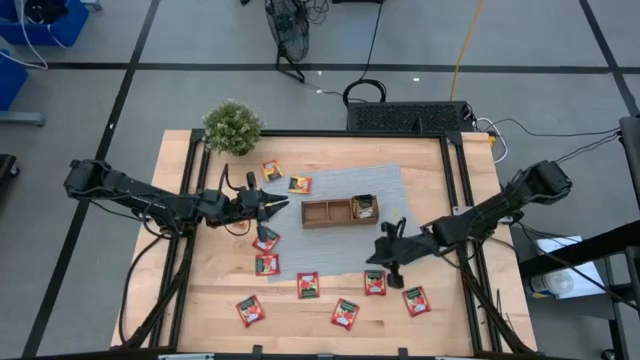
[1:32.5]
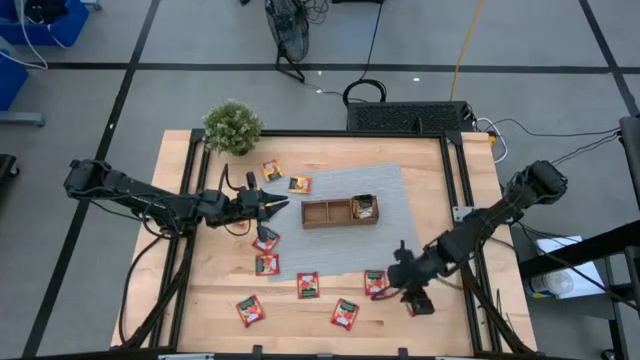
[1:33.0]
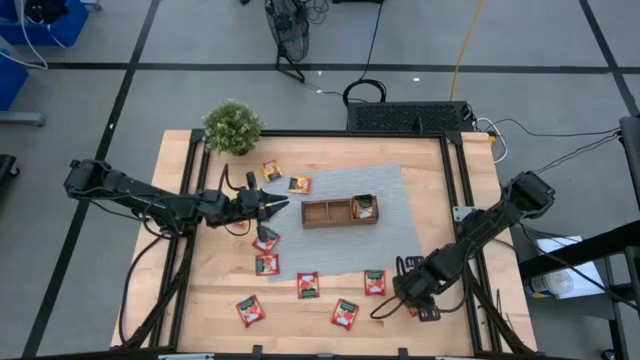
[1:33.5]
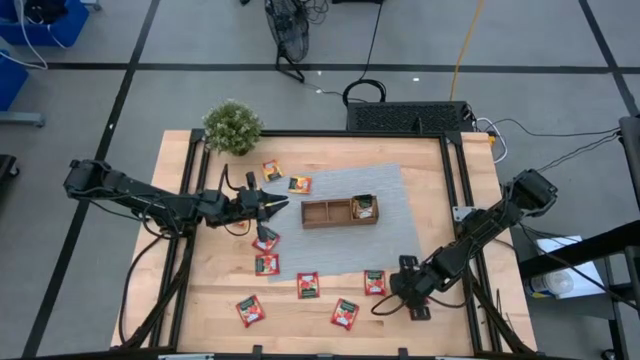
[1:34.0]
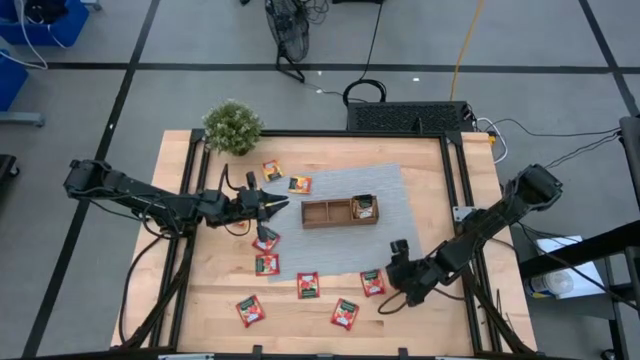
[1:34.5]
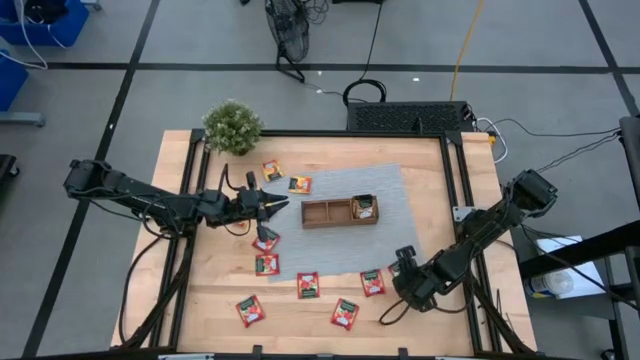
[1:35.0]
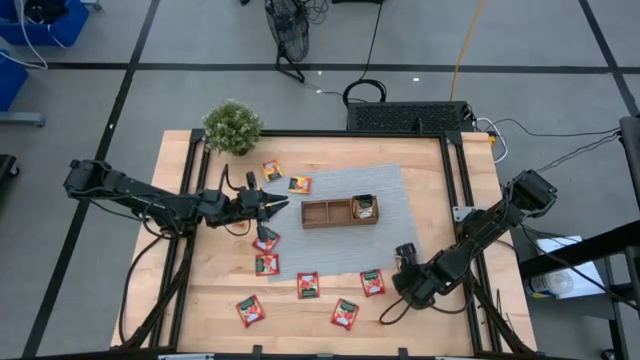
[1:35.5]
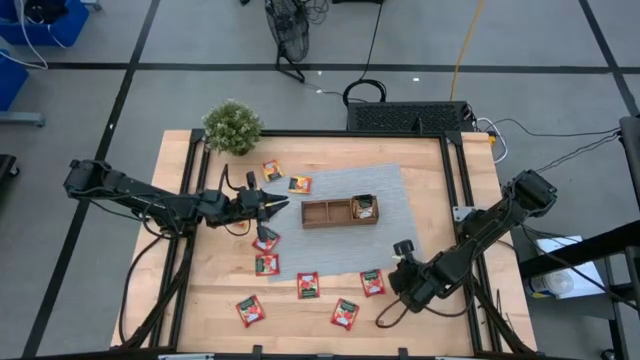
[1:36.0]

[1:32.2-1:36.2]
Task: Pick & Place Tea
Put the red tea bag into the middle section of the wooden organizer

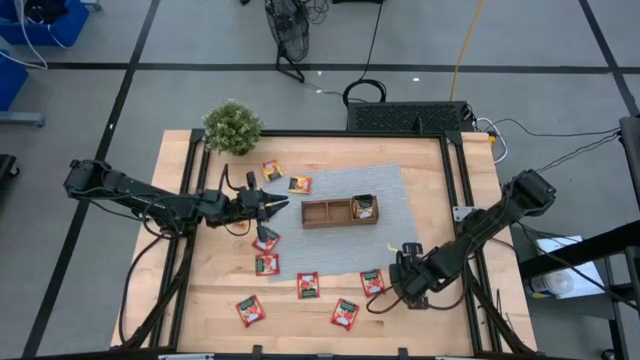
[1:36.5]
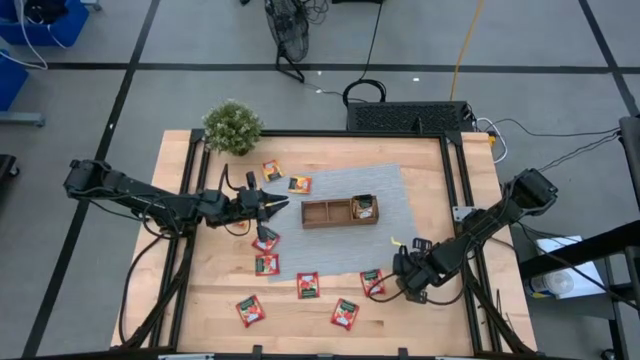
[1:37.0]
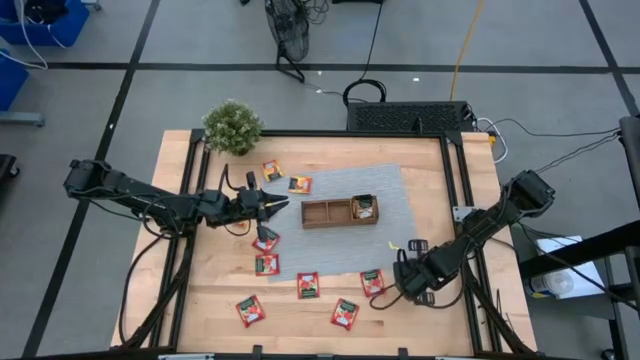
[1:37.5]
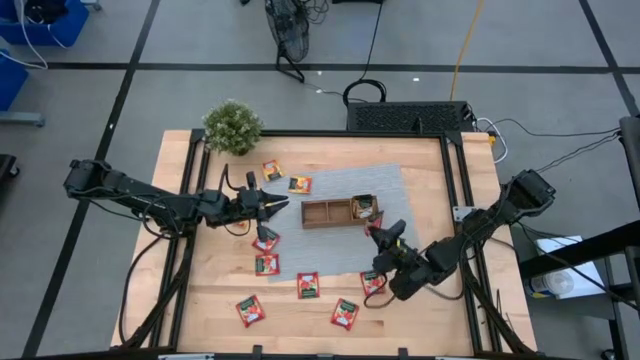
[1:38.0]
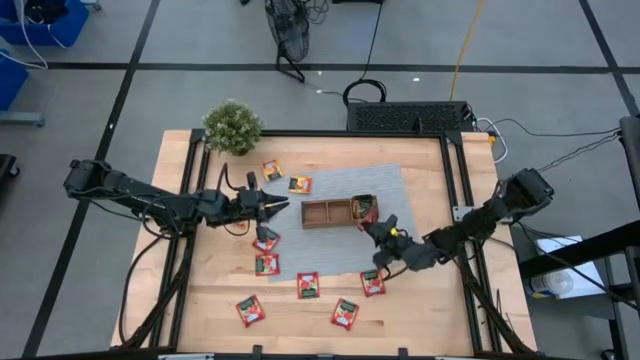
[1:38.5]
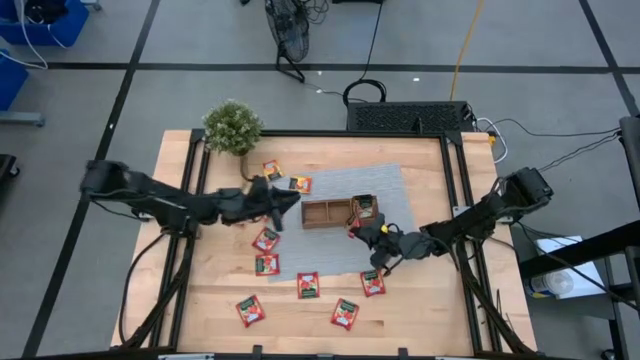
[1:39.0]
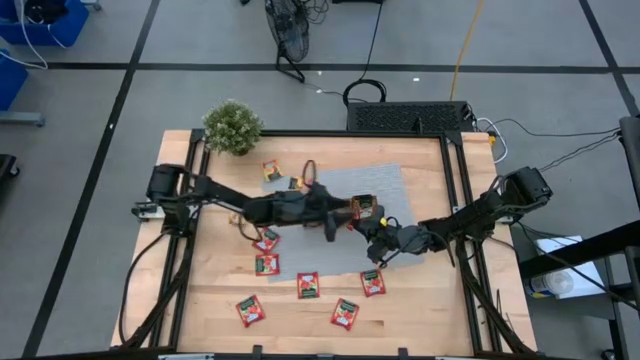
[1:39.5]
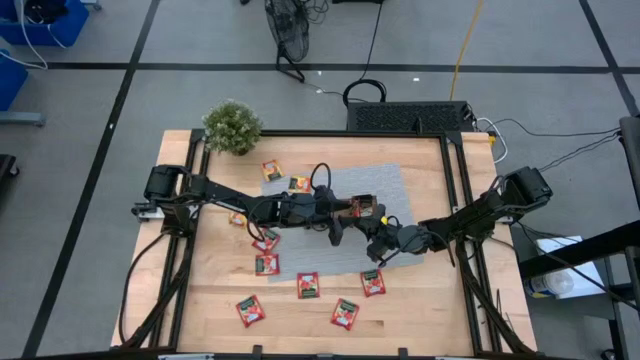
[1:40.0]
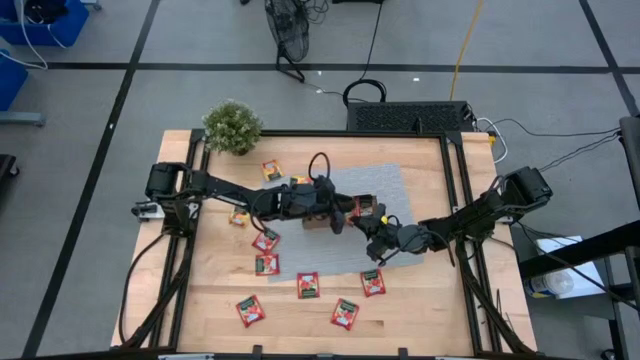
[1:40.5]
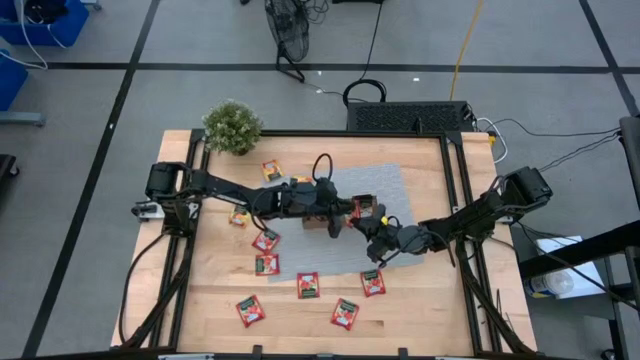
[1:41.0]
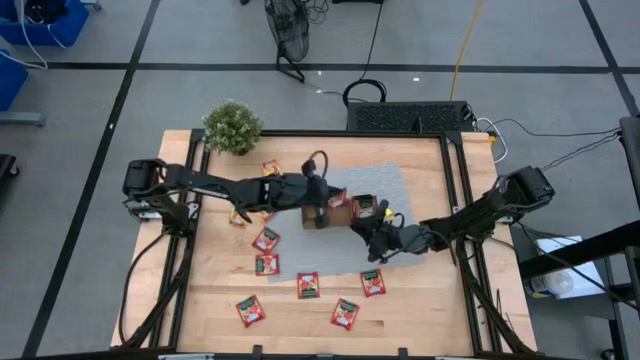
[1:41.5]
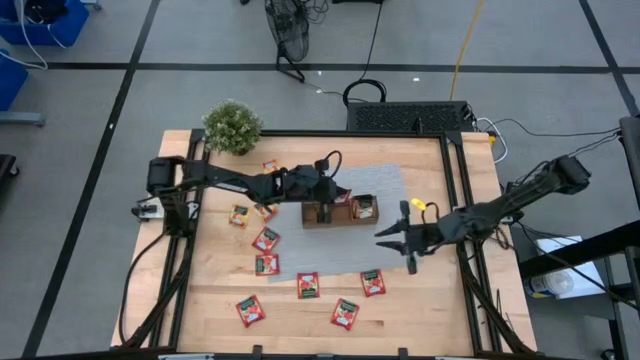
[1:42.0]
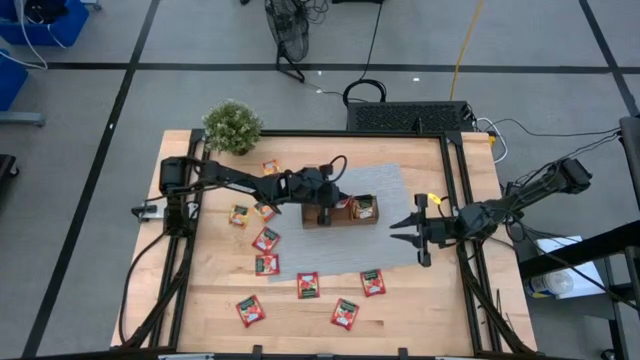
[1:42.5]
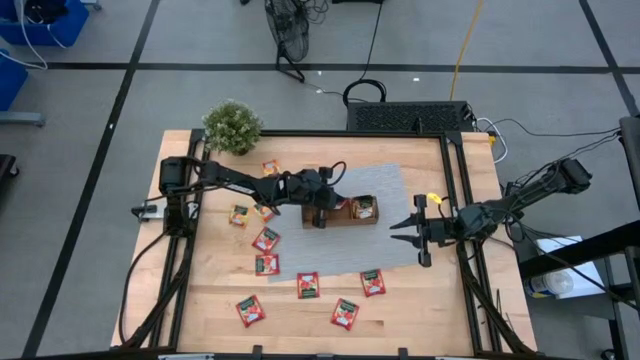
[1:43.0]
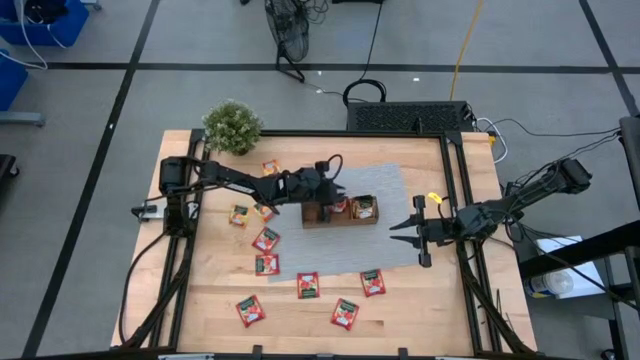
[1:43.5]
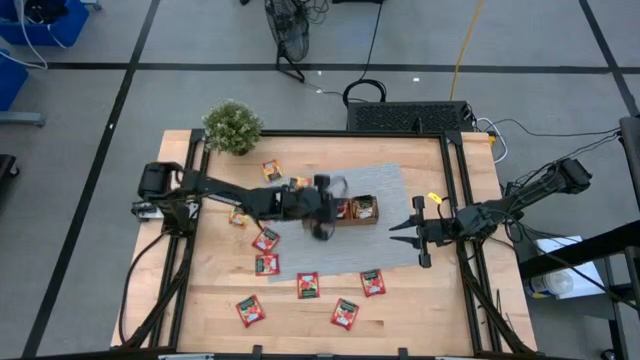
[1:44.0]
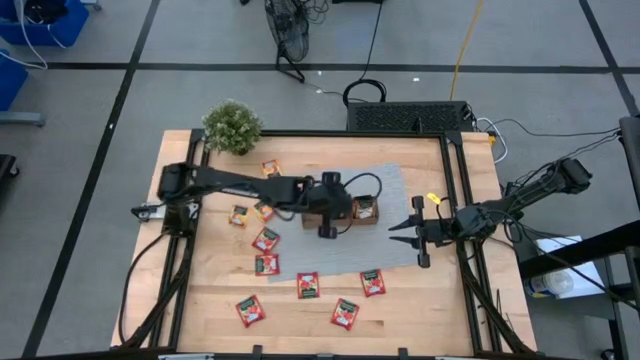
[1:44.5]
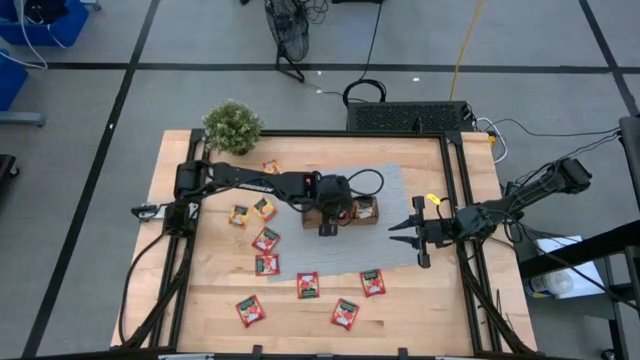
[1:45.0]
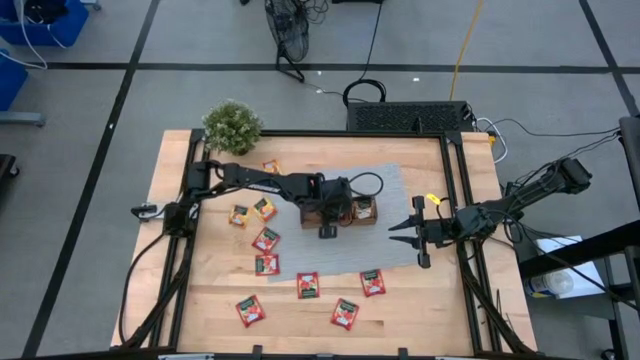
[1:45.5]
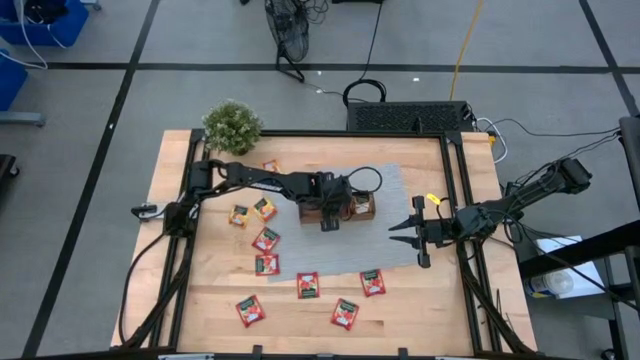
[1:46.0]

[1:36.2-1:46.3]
Put the red tea bag into the middle section of the wooden organizer

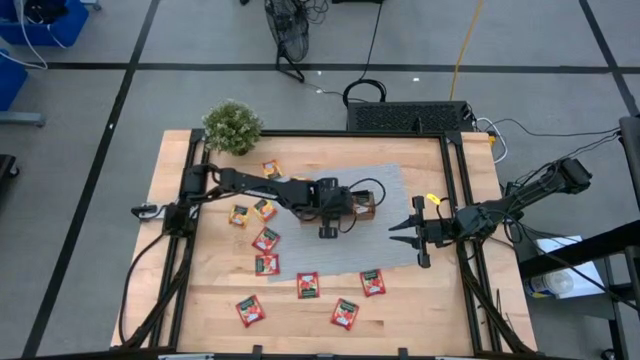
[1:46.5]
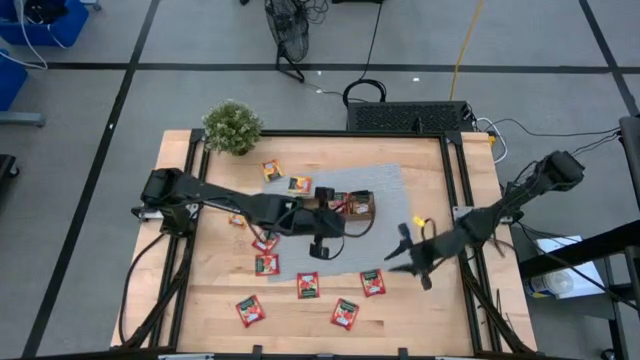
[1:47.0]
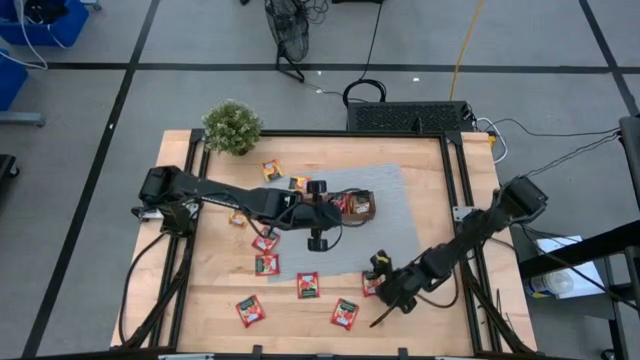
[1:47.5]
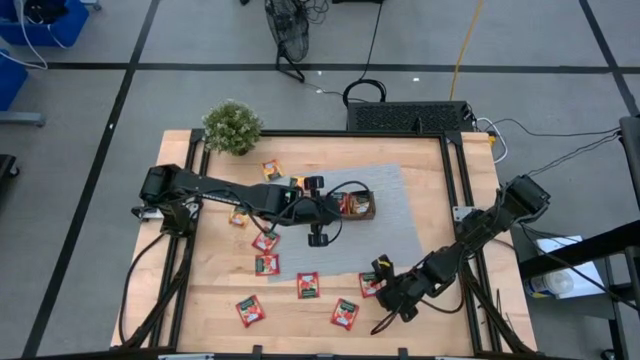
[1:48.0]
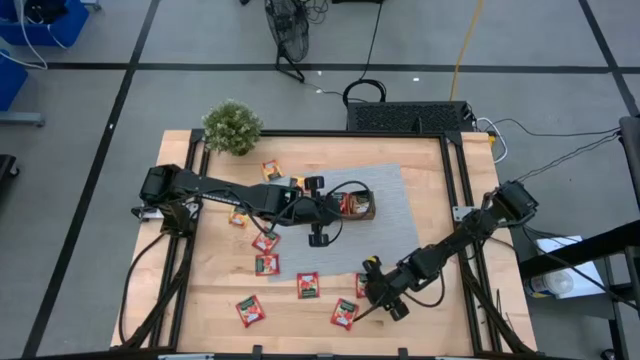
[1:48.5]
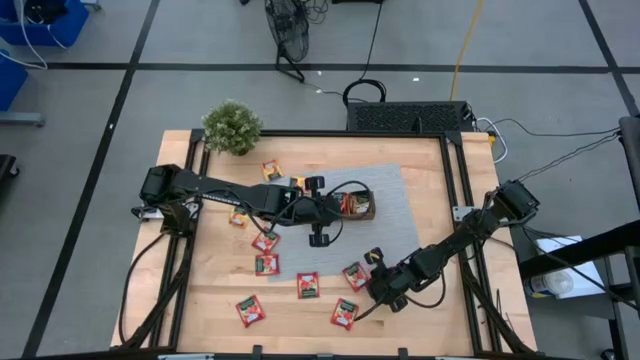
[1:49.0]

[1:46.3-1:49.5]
Put the red tea bag into the middle section of the wooden organizer

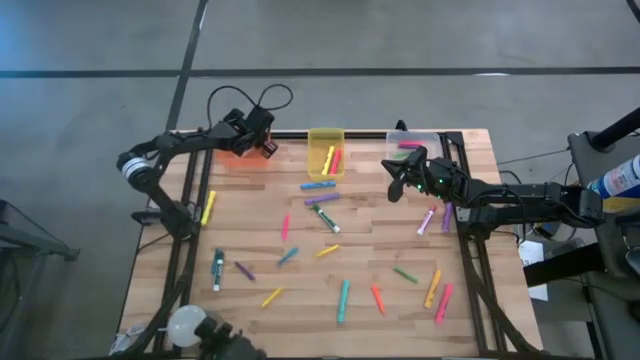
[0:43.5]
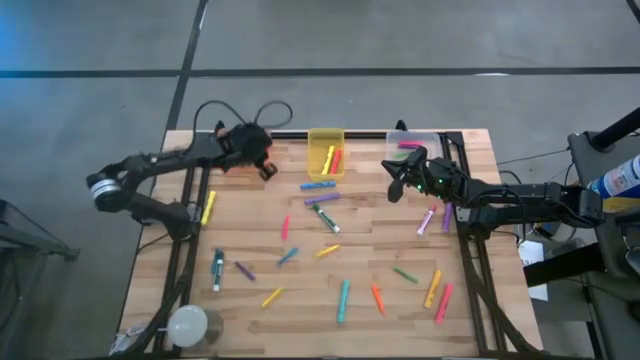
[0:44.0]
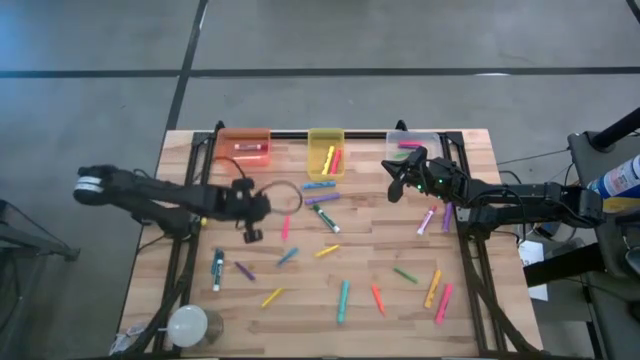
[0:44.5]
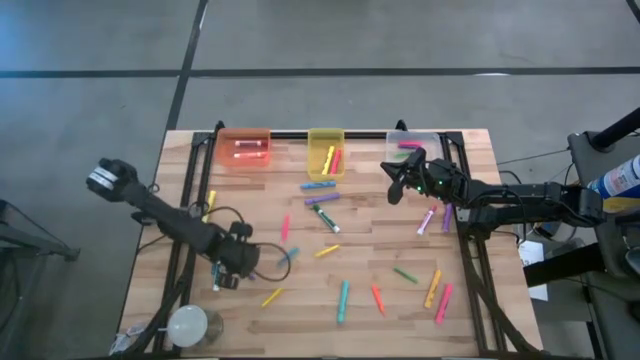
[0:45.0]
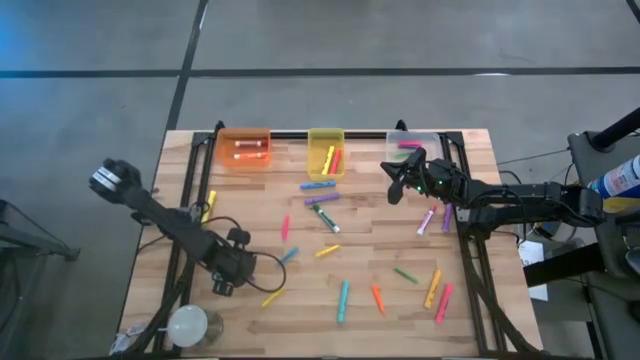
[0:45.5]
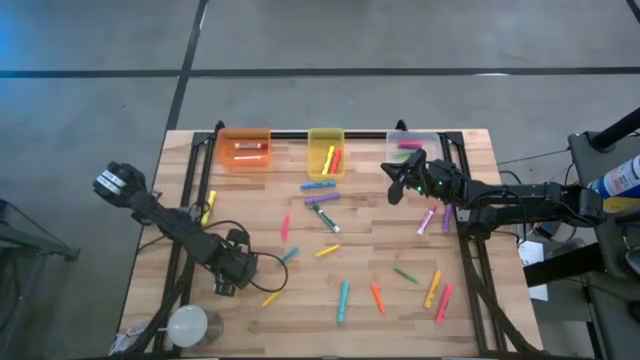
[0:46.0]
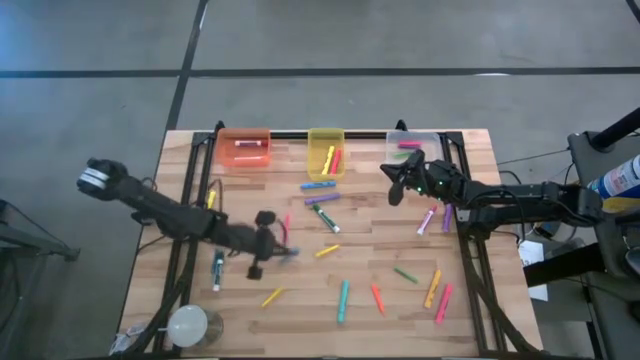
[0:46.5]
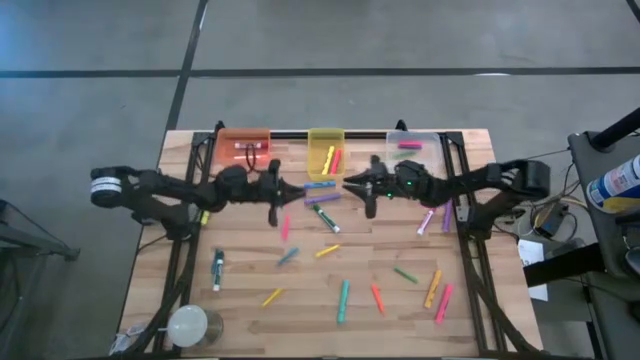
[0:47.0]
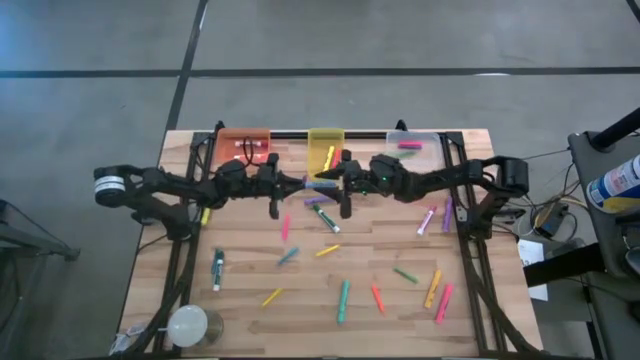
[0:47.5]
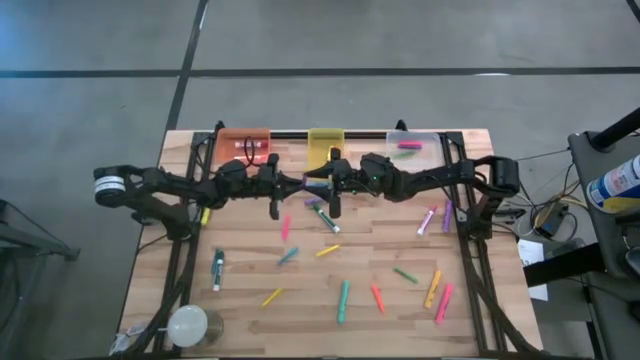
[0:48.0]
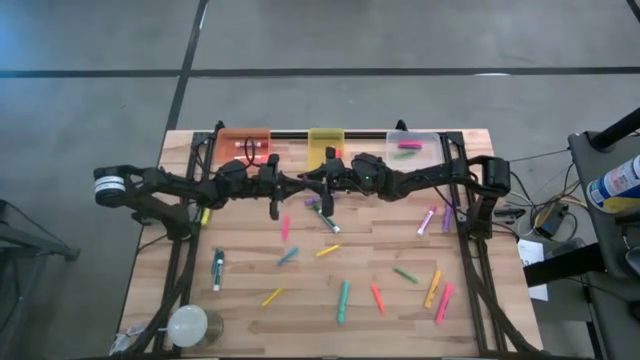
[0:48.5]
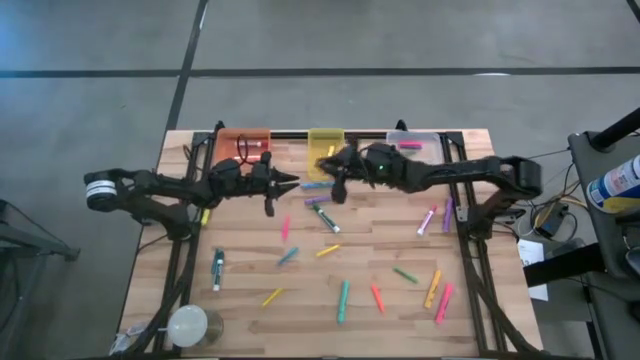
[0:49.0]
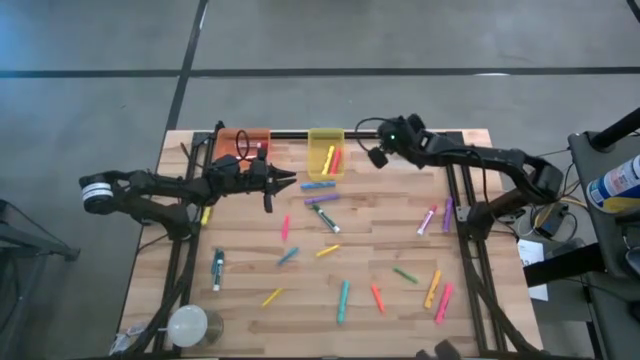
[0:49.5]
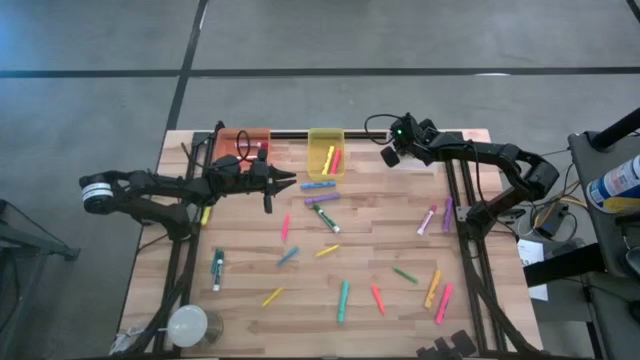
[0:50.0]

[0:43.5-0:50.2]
Task: Pick & Place Markers
Put the violet pen into the transparent bin
